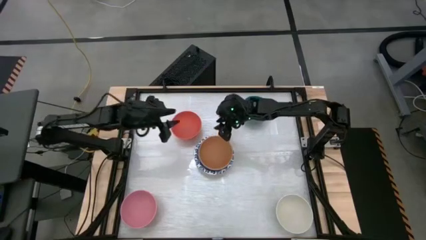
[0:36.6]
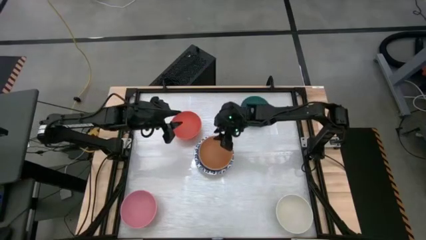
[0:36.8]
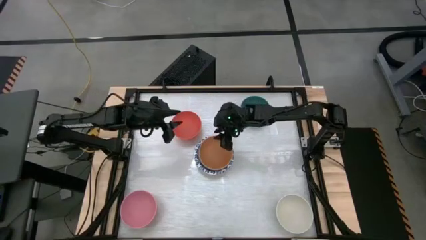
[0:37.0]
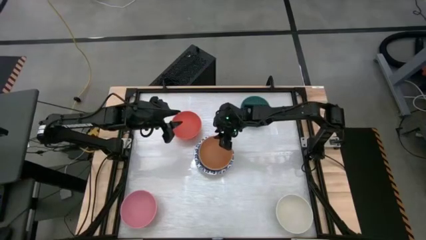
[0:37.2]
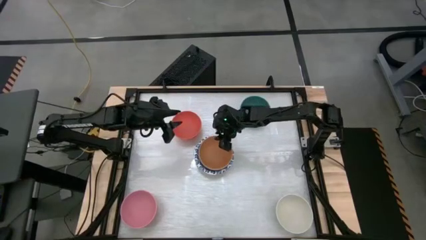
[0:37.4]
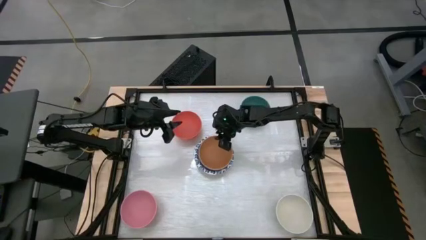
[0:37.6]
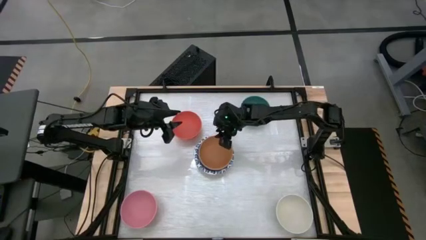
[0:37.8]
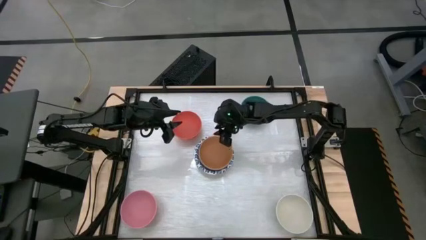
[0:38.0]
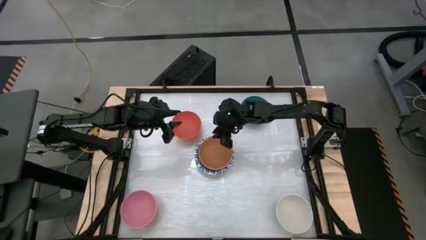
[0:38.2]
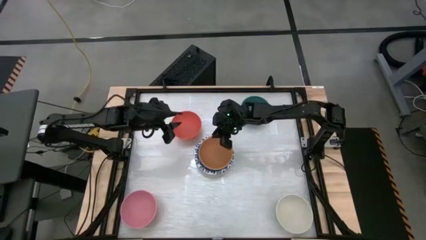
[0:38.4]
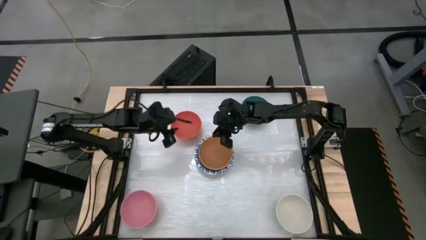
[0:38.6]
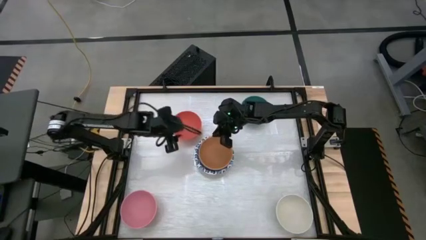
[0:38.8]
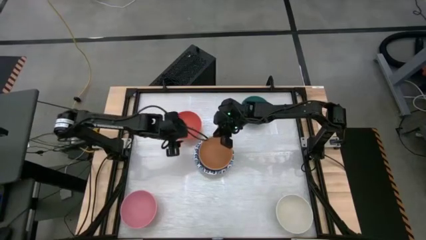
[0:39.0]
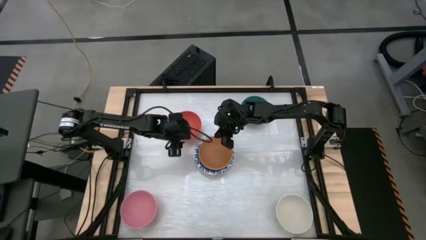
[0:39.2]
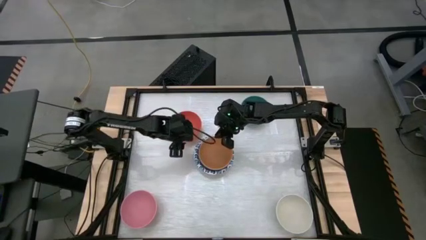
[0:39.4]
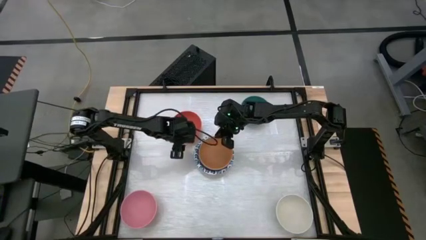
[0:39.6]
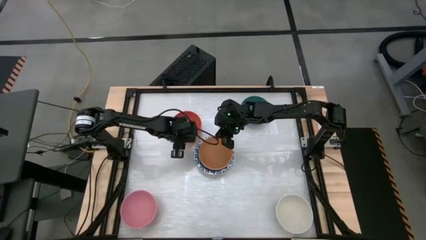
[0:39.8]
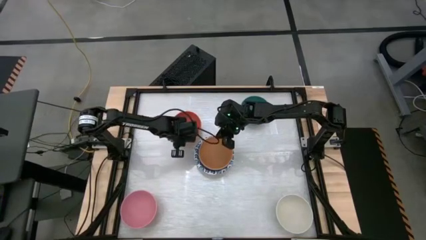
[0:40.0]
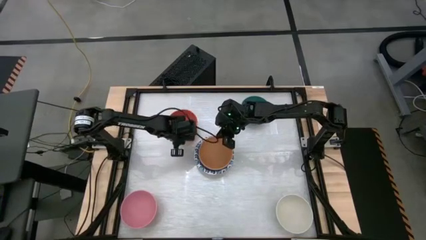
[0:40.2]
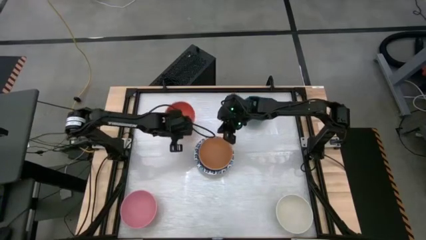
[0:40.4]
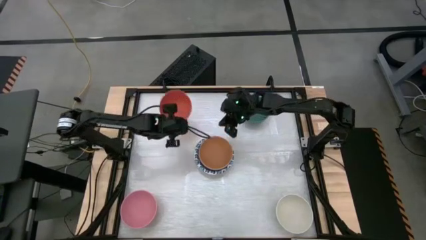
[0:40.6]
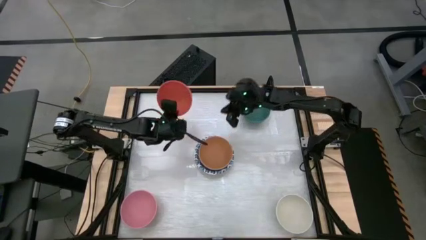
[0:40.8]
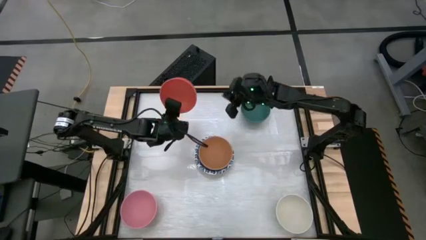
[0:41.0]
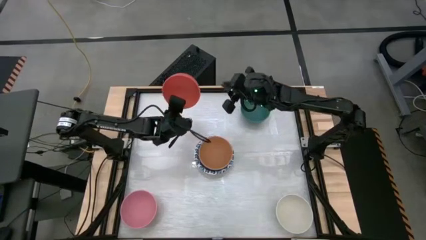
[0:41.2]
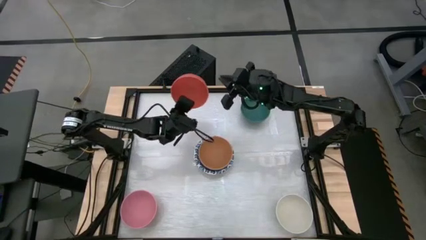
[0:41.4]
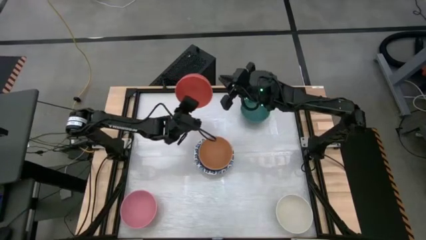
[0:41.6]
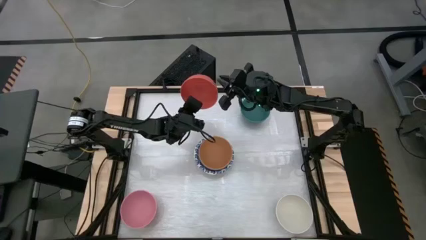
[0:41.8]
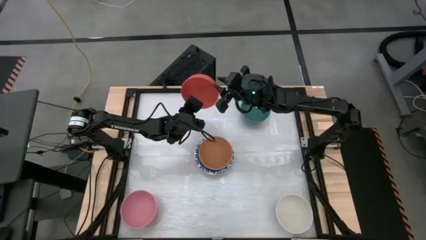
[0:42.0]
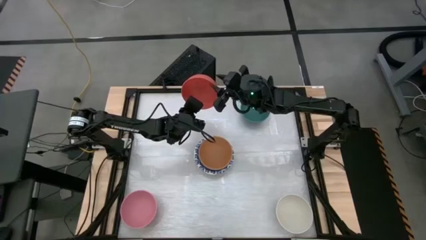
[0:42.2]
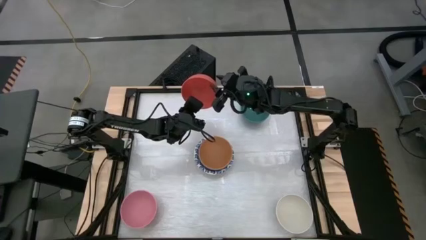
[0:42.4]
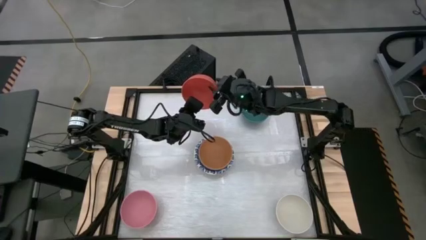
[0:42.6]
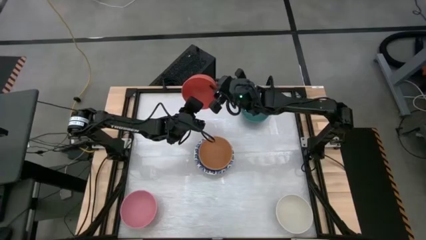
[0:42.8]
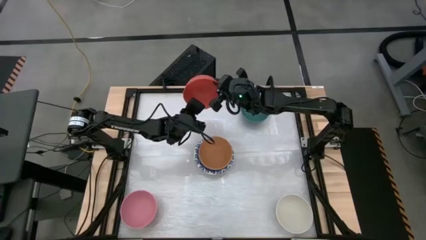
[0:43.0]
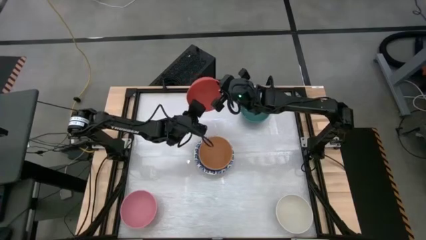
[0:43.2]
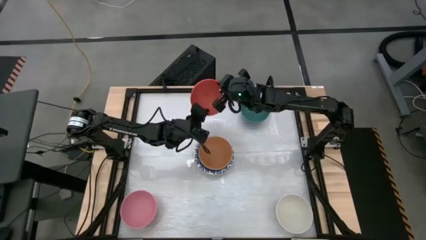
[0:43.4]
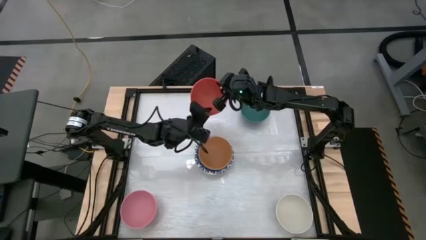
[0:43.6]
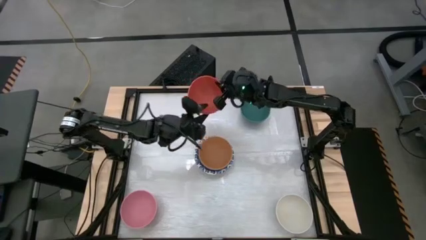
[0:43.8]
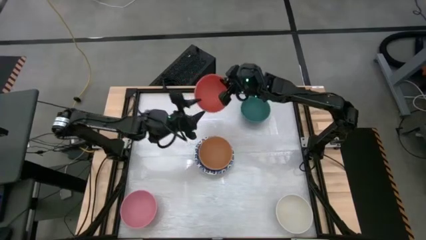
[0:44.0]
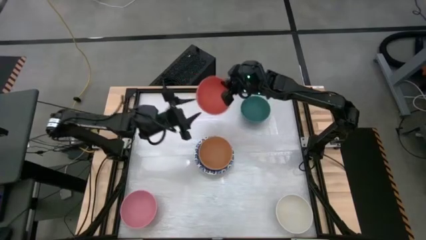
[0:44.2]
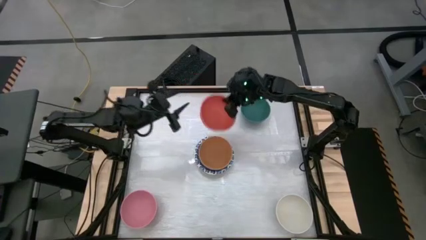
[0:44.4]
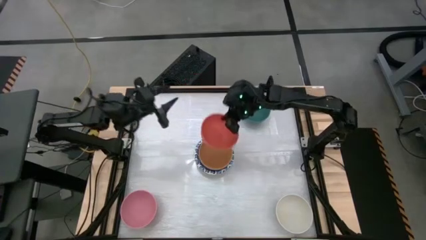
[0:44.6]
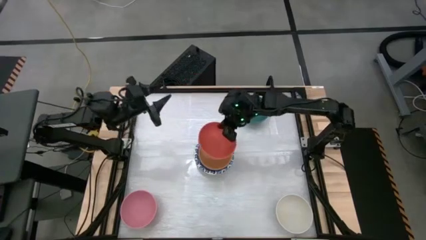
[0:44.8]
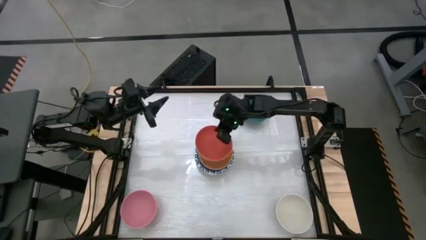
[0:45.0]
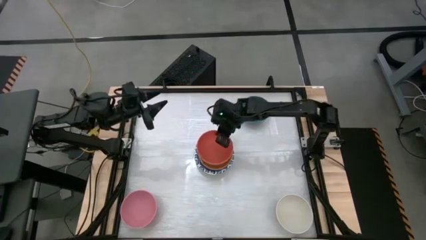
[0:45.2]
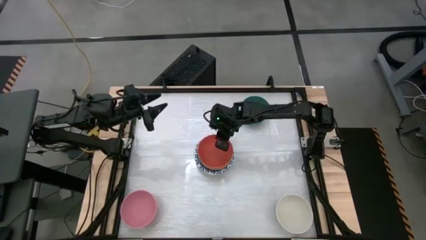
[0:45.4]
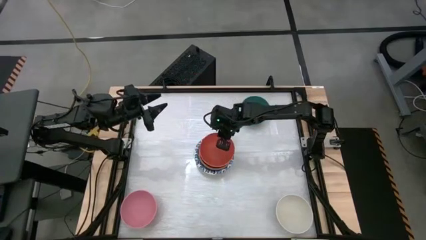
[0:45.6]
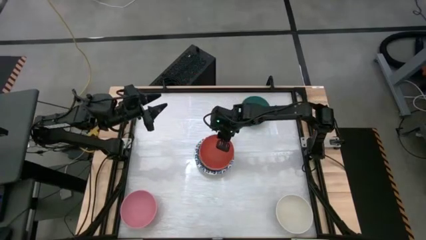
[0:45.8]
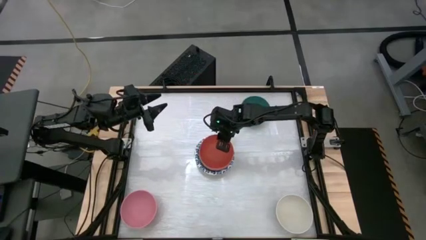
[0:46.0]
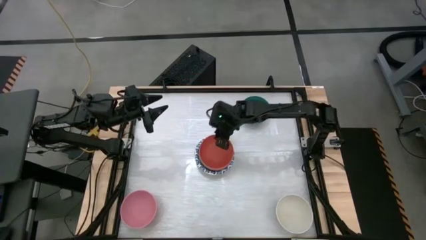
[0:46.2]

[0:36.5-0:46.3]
Stack the orange bowl on top of the brown bowl
